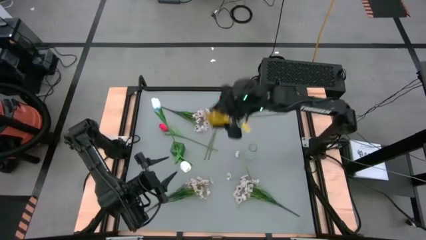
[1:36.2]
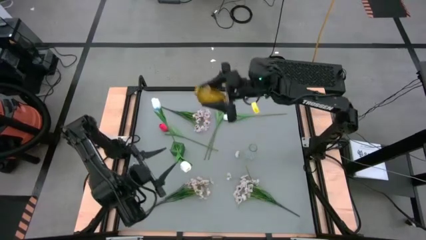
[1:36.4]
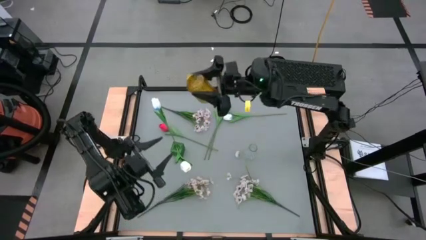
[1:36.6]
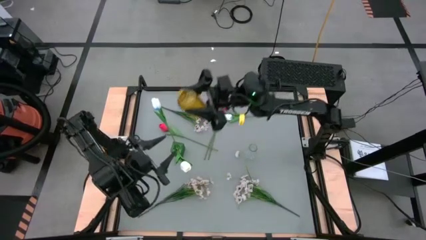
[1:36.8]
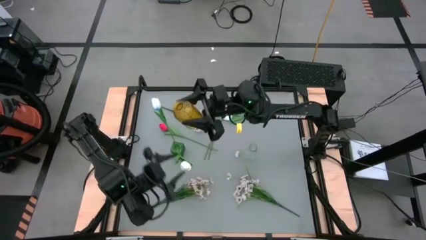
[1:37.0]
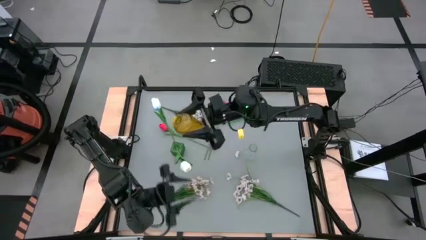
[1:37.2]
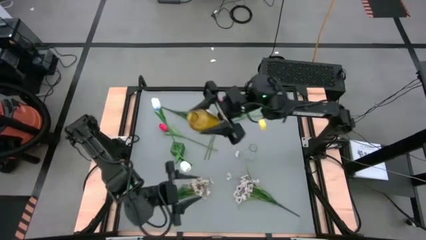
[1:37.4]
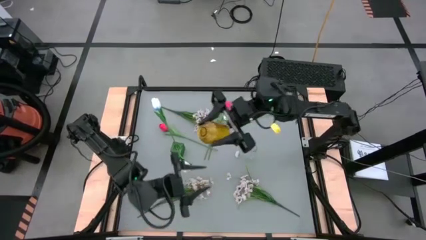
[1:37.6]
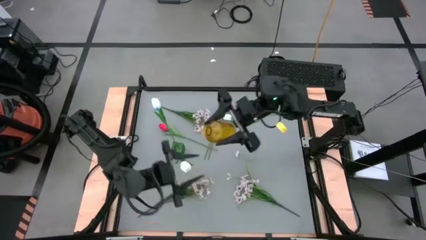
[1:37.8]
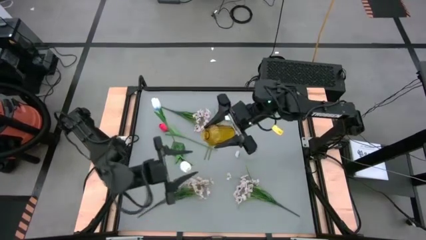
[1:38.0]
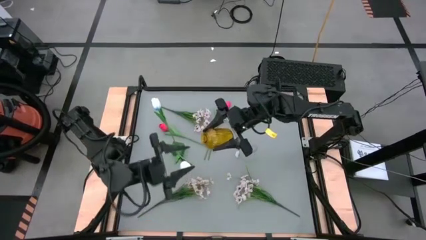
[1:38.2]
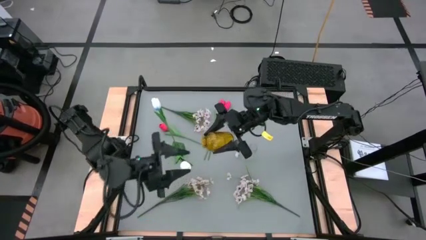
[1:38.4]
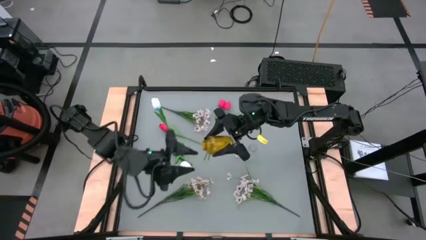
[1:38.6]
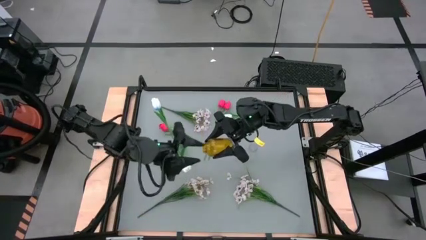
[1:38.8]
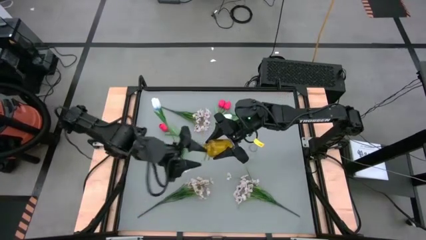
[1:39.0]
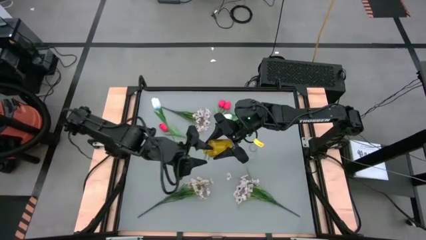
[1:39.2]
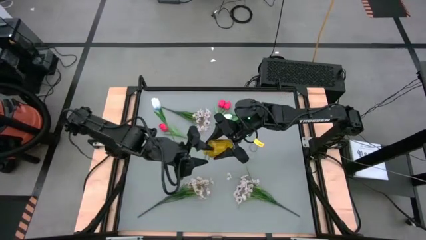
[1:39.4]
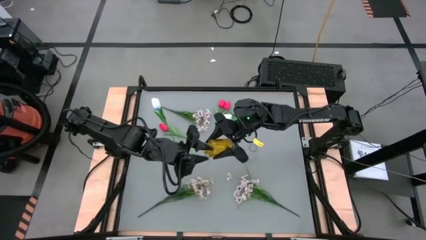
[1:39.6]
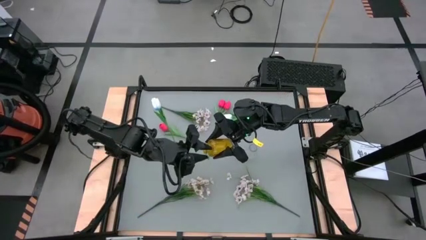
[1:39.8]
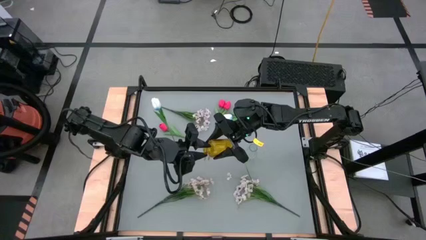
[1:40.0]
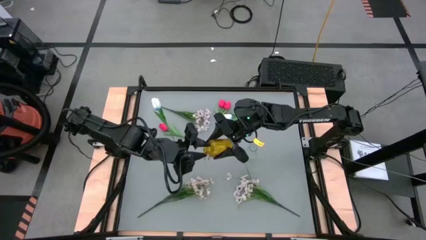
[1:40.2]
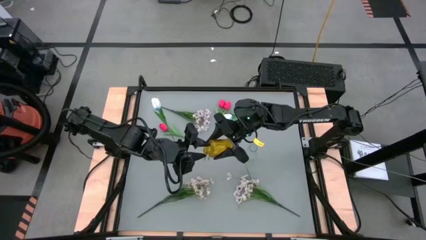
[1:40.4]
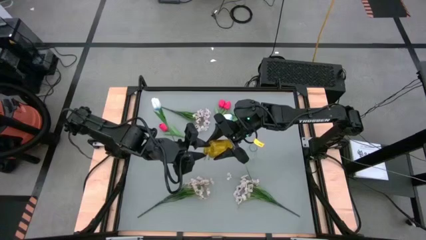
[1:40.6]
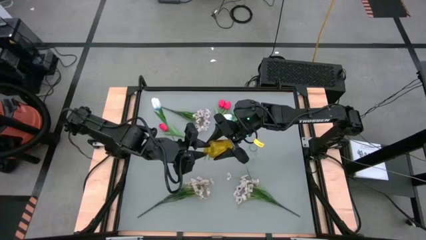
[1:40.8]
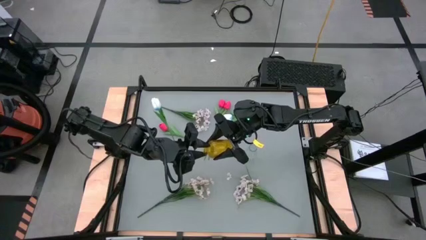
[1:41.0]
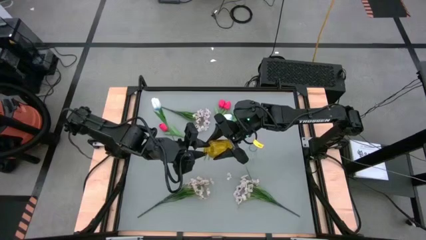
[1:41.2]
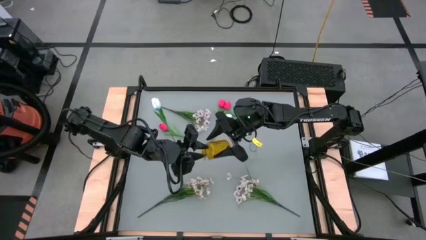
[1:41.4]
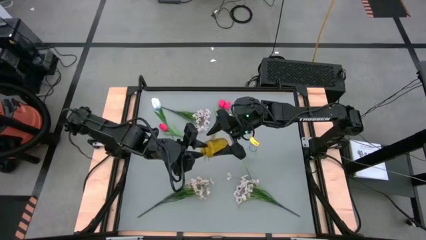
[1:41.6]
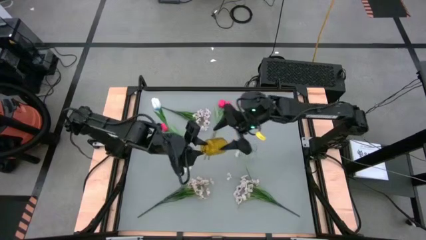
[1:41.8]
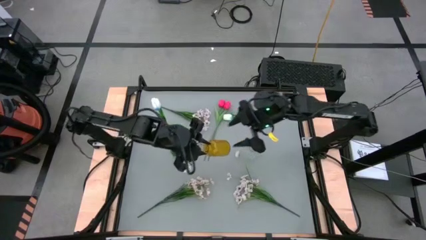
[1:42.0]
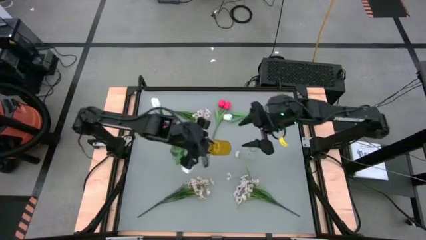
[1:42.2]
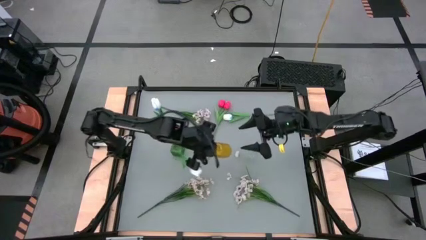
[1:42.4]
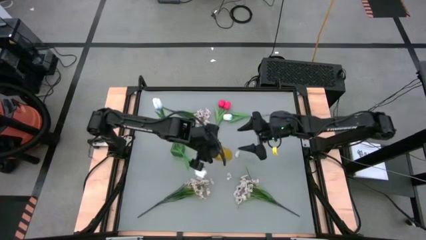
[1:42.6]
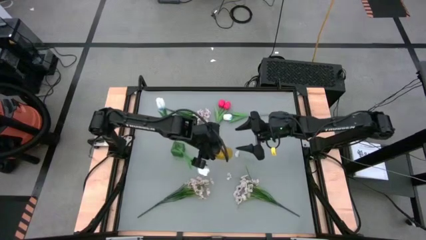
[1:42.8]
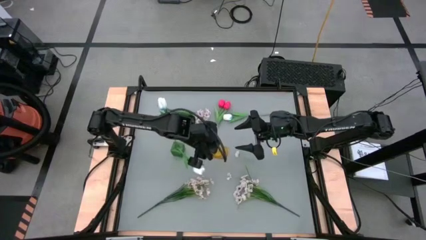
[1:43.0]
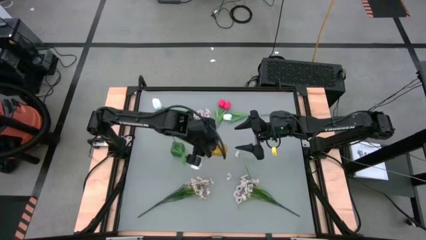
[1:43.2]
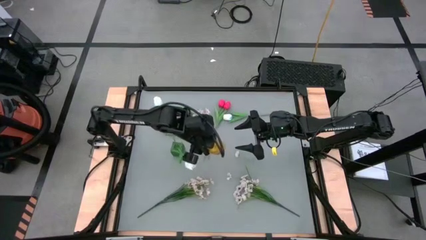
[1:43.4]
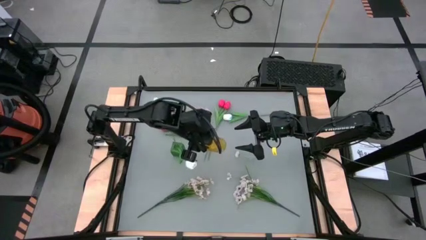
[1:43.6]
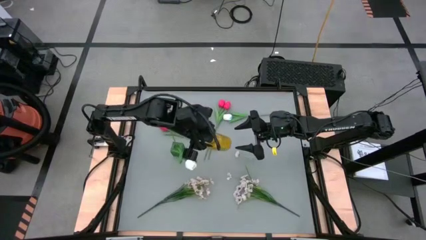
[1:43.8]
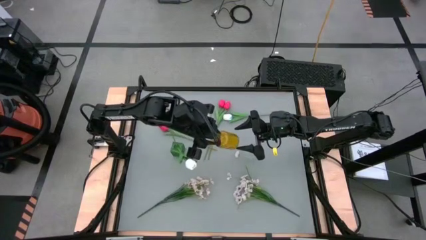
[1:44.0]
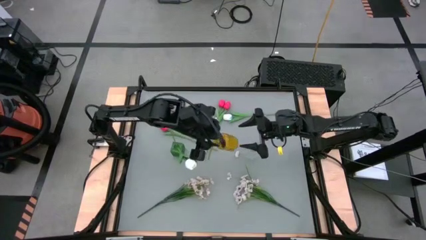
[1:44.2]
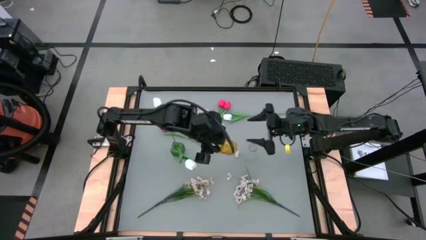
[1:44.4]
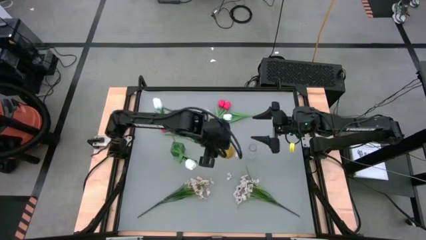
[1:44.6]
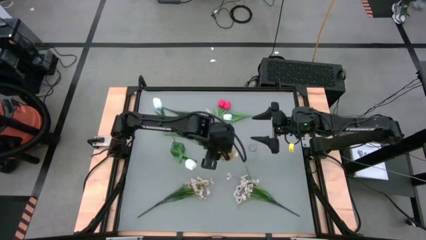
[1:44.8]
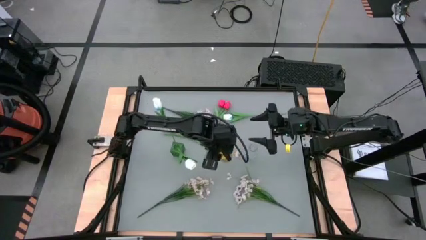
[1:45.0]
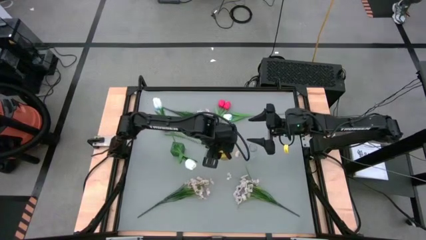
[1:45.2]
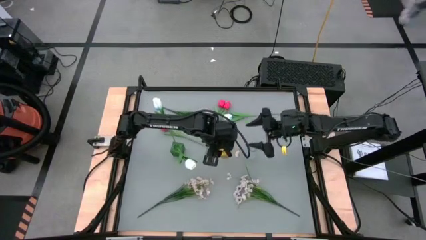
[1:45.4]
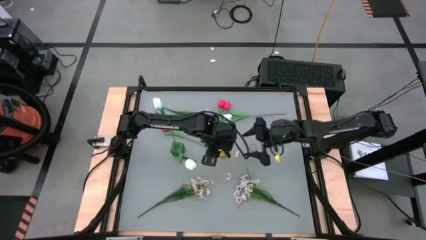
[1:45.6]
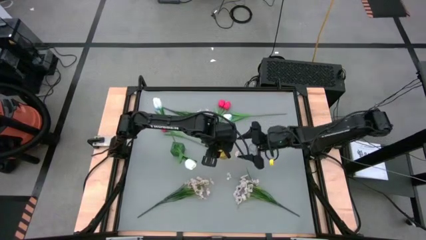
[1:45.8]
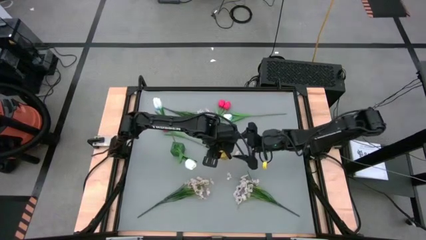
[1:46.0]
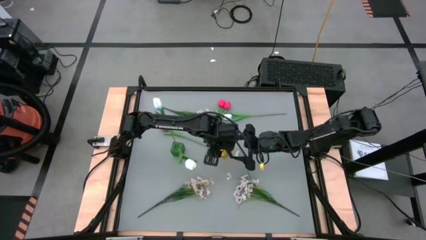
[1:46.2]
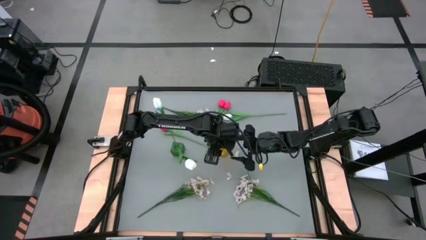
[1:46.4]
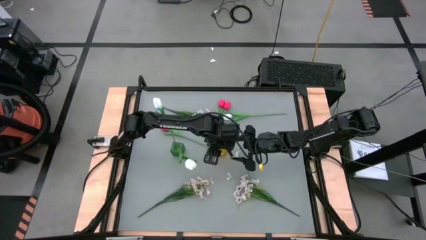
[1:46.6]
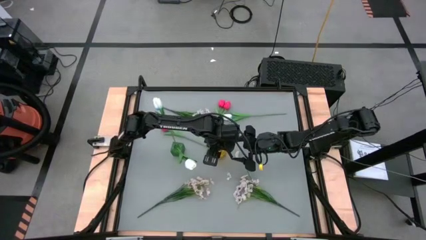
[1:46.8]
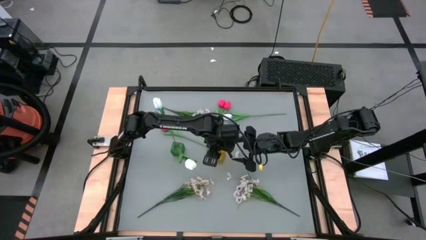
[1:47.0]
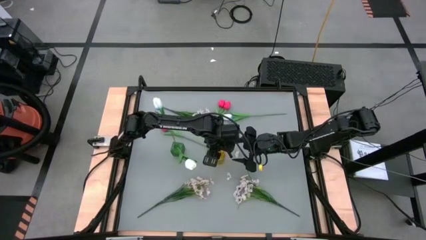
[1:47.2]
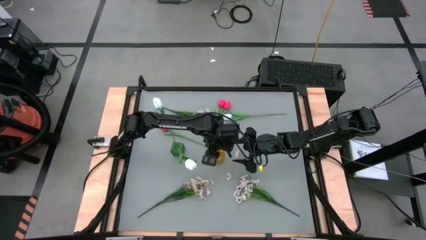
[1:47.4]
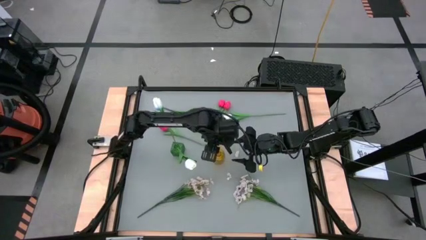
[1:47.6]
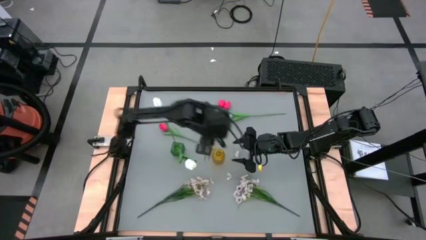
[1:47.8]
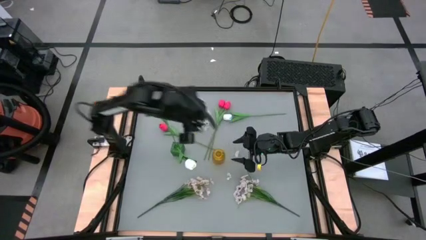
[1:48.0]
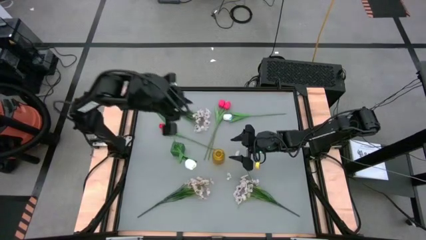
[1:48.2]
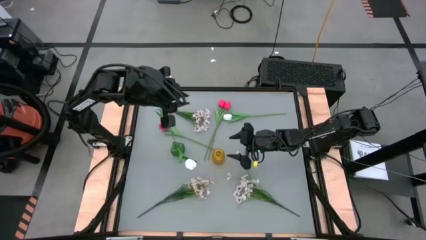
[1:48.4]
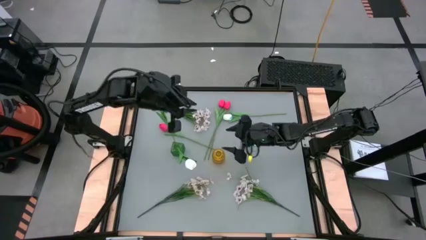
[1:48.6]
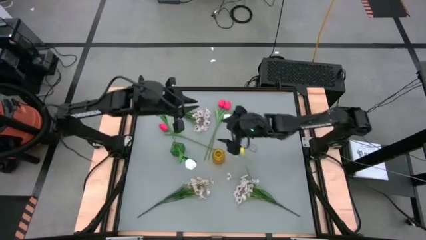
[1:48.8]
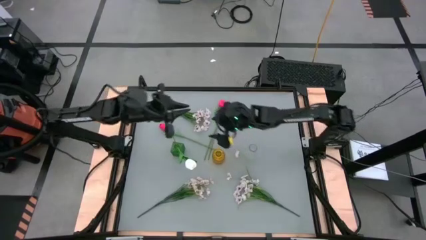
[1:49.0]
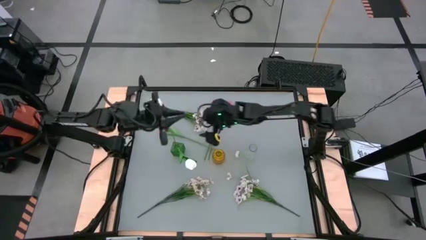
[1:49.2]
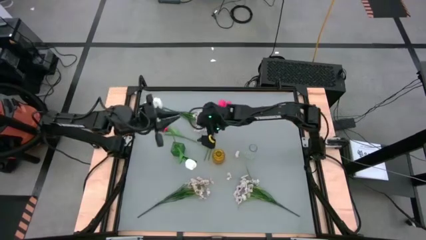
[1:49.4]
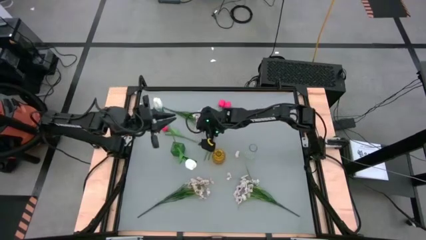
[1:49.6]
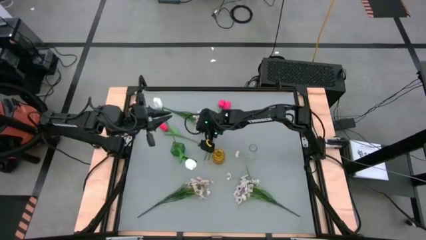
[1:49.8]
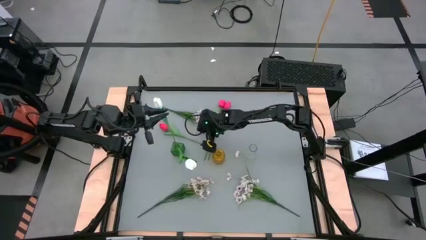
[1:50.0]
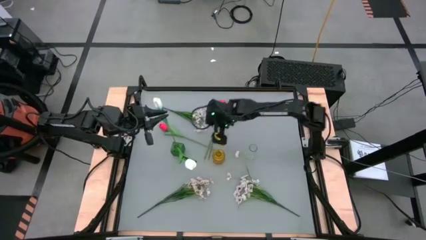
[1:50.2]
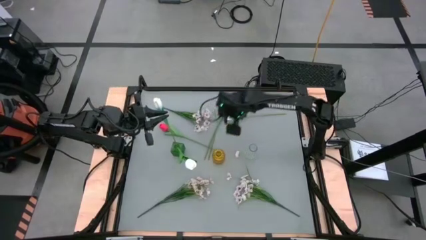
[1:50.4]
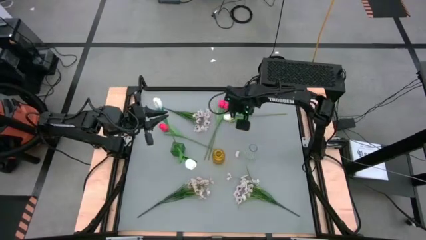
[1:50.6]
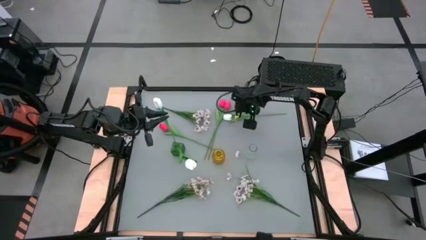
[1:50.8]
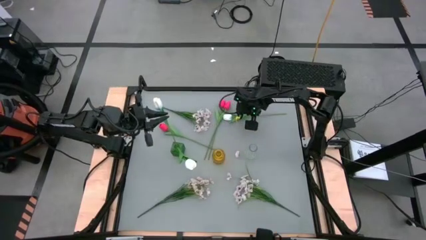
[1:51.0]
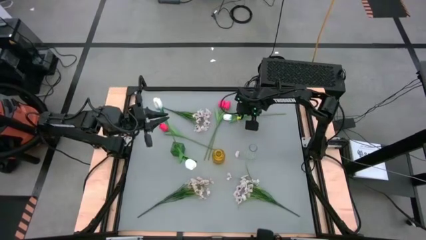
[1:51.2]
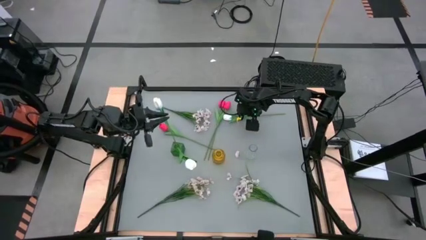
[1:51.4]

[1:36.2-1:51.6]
Task: Sort flowers into vase by color
Adjust the yellow flower vase

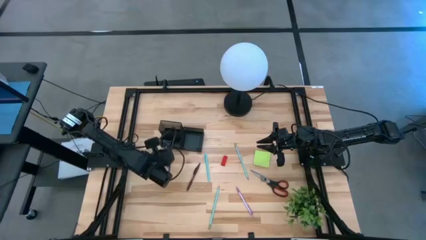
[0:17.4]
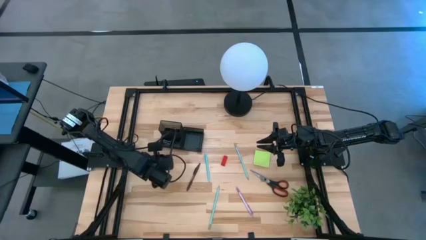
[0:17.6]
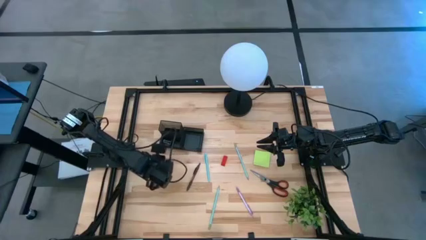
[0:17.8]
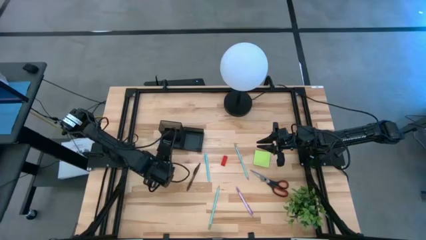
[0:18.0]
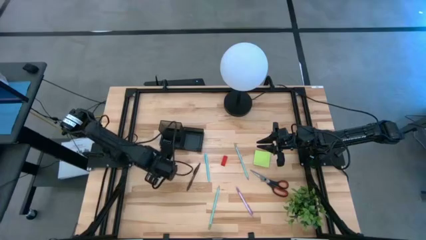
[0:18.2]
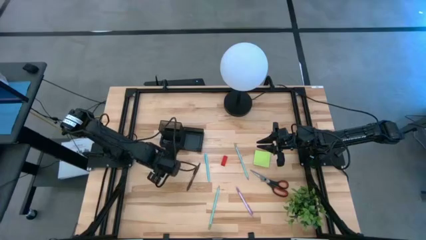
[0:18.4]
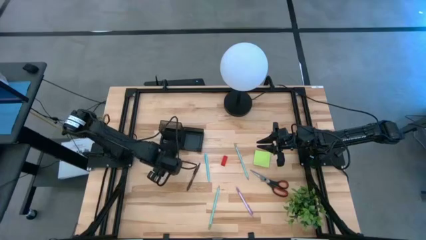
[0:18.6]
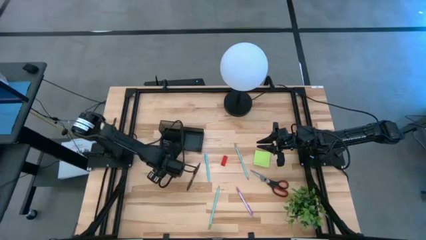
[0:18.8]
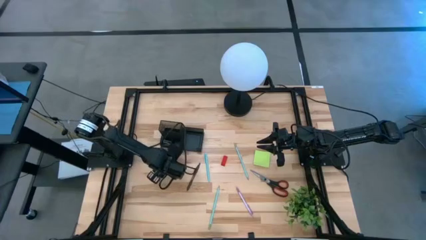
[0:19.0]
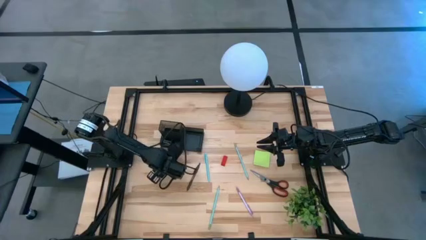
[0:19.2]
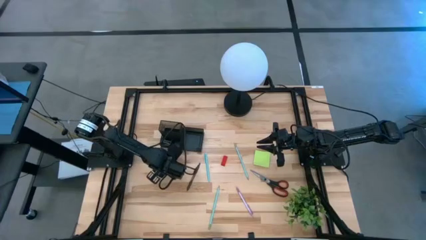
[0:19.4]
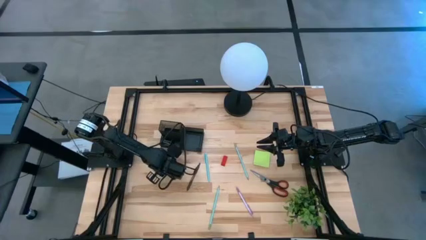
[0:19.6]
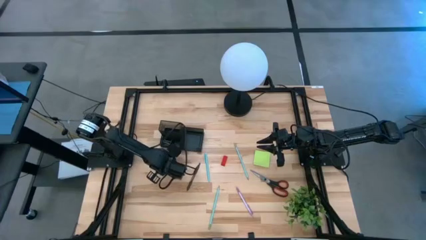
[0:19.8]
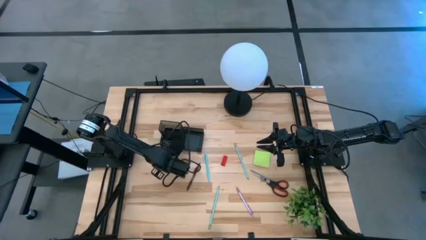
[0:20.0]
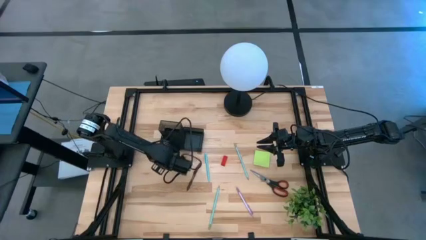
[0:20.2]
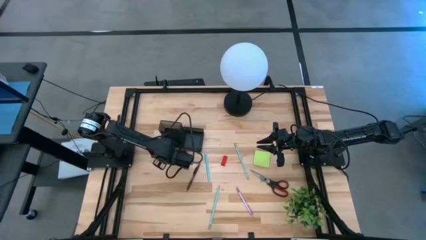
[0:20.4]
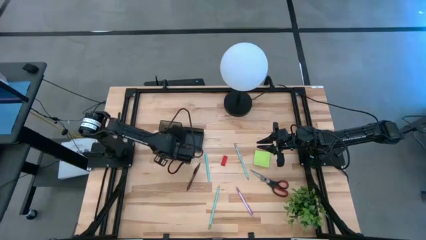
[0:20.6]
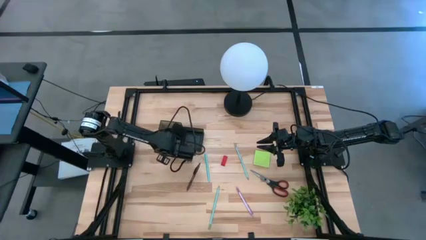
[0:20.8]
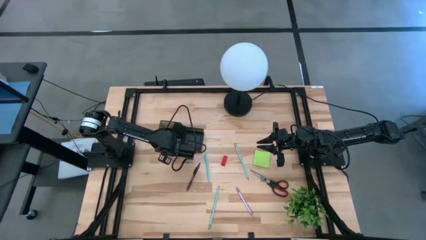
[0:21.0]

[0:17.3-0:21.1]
Task: Pick and place office supplies into organizer
Put the black binder clip into the black desk organizer
